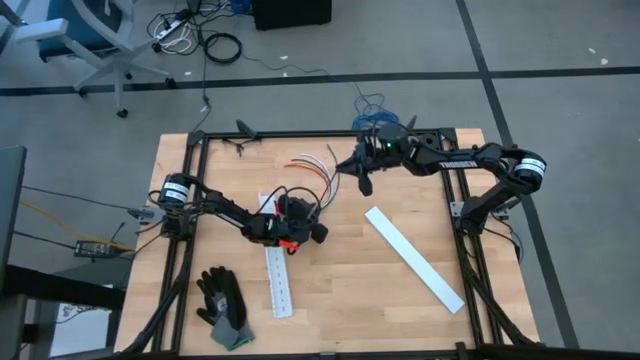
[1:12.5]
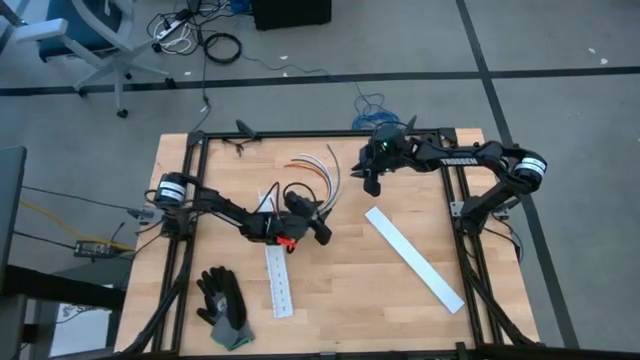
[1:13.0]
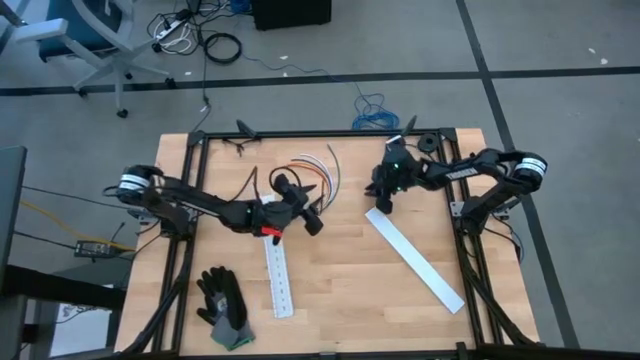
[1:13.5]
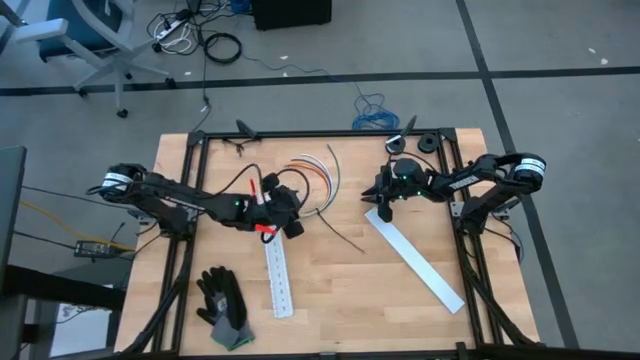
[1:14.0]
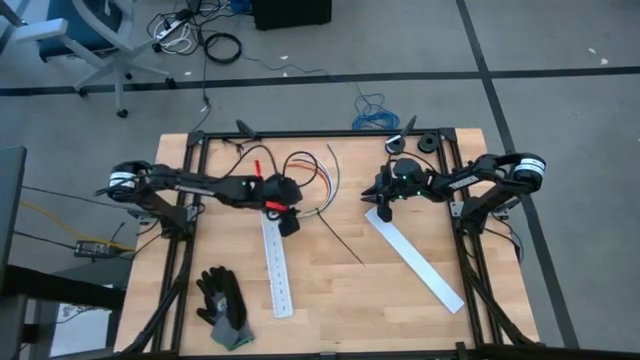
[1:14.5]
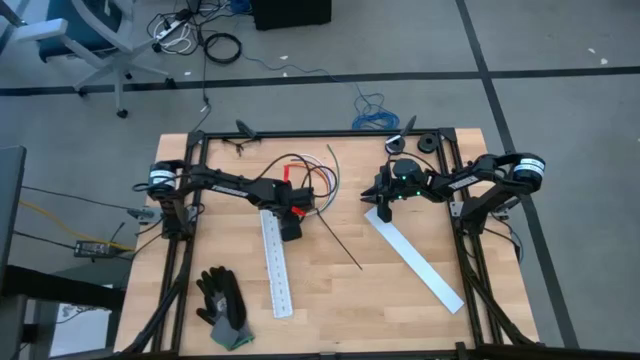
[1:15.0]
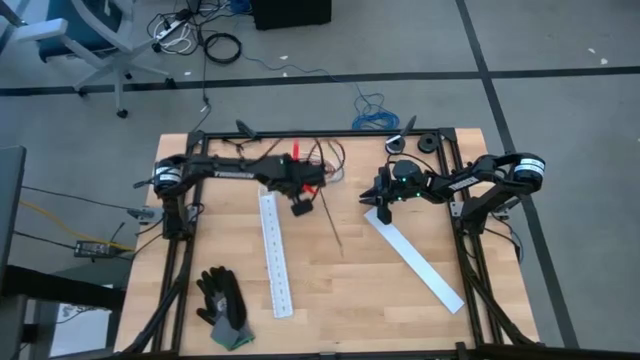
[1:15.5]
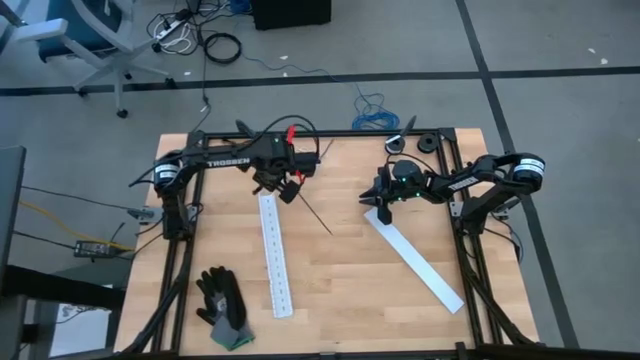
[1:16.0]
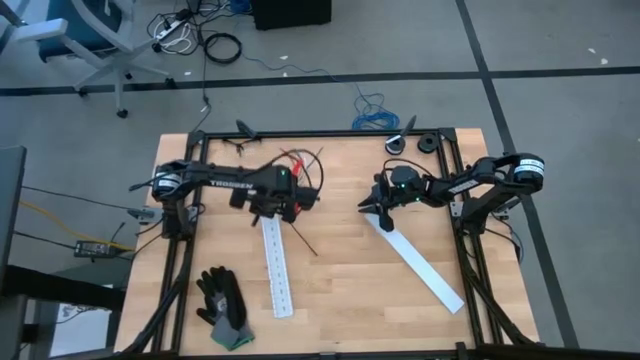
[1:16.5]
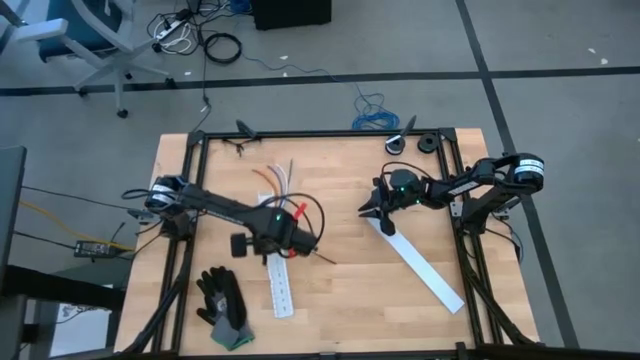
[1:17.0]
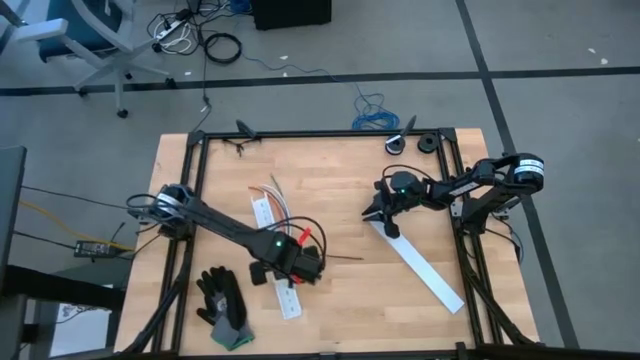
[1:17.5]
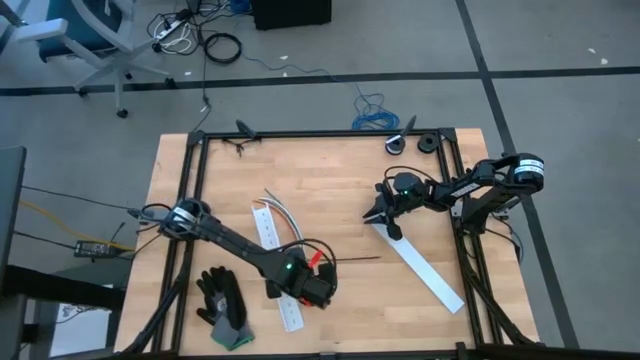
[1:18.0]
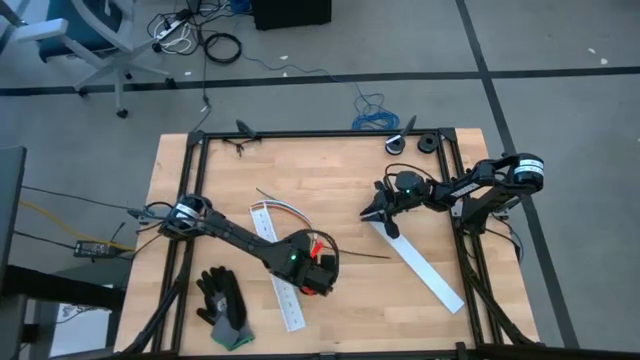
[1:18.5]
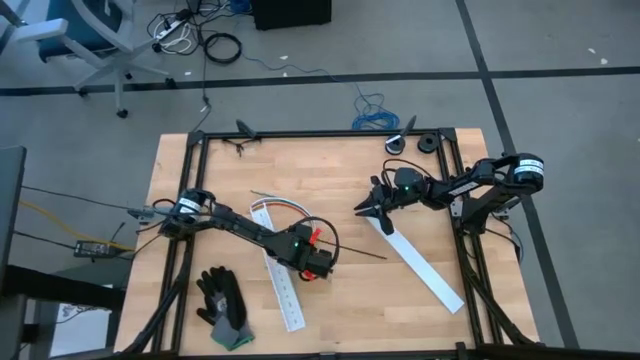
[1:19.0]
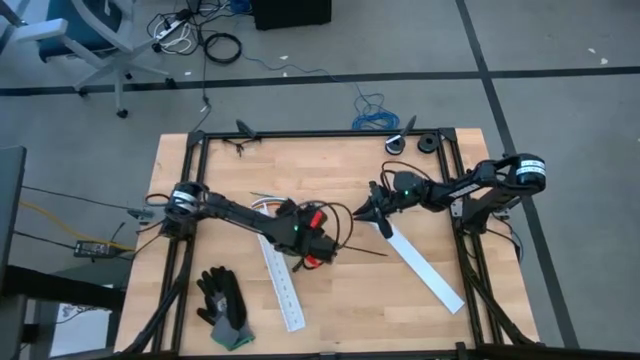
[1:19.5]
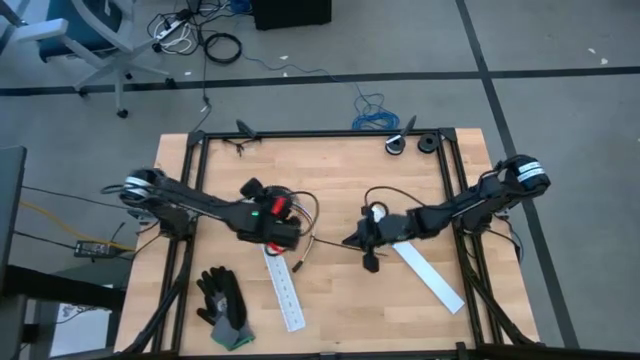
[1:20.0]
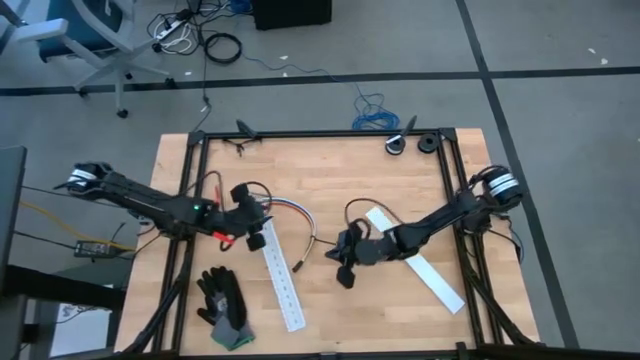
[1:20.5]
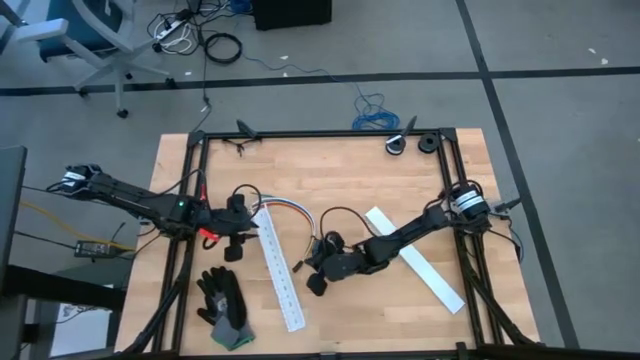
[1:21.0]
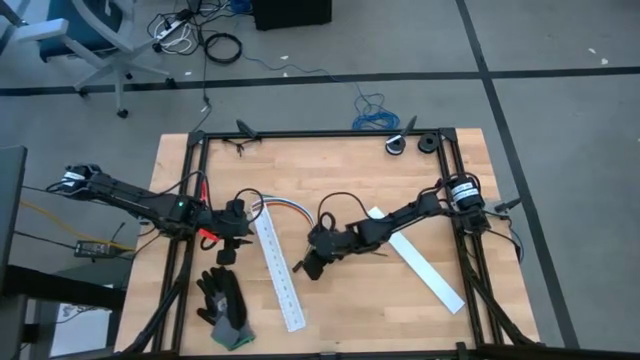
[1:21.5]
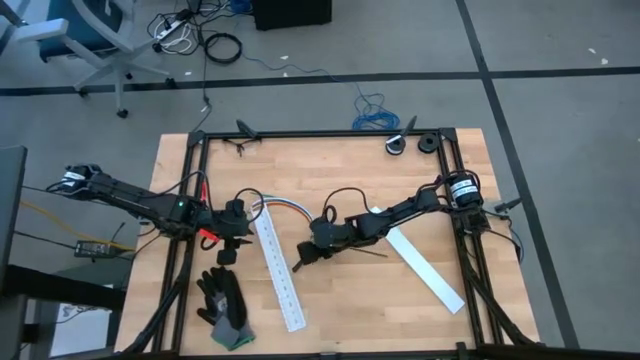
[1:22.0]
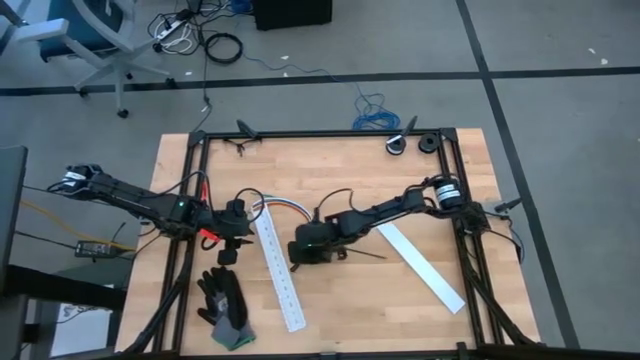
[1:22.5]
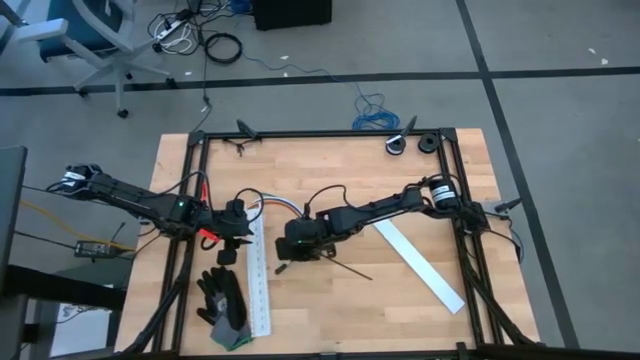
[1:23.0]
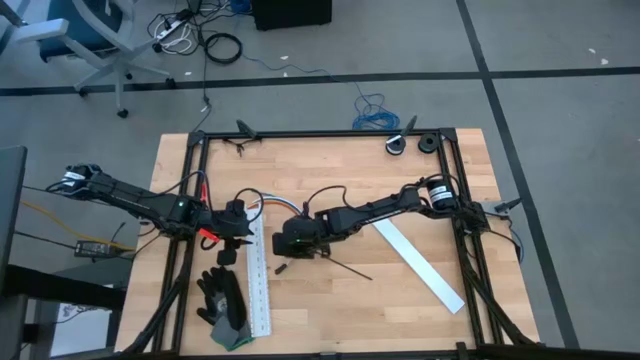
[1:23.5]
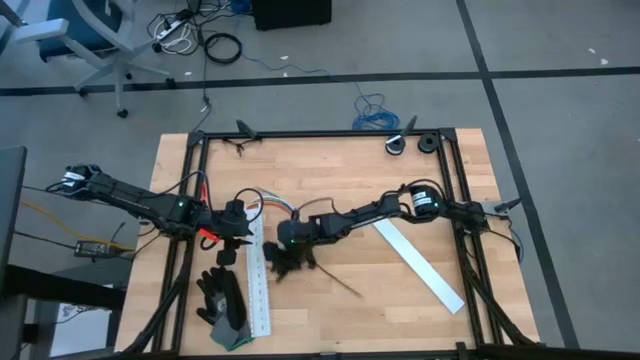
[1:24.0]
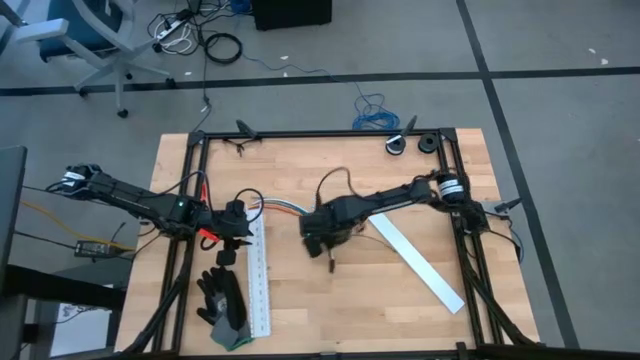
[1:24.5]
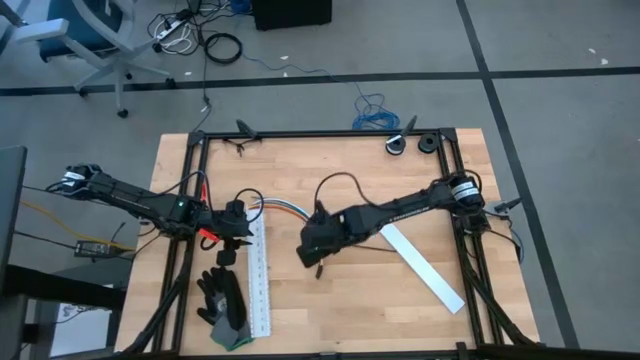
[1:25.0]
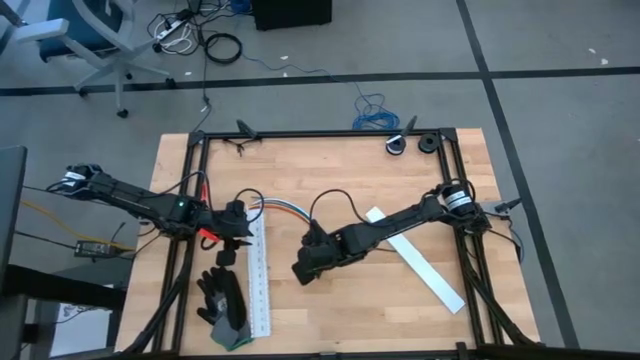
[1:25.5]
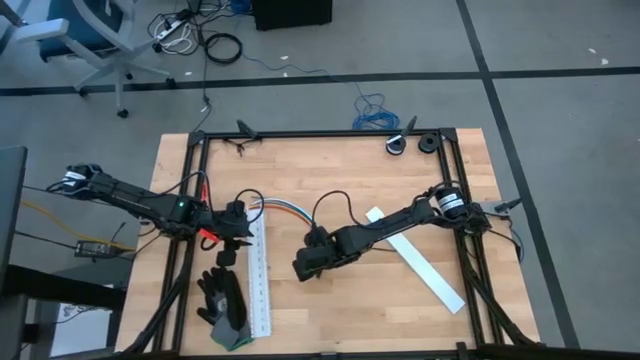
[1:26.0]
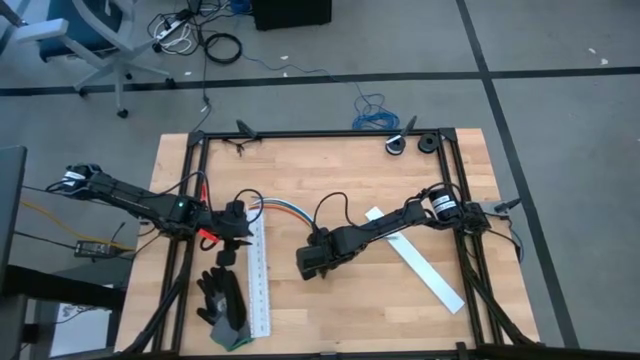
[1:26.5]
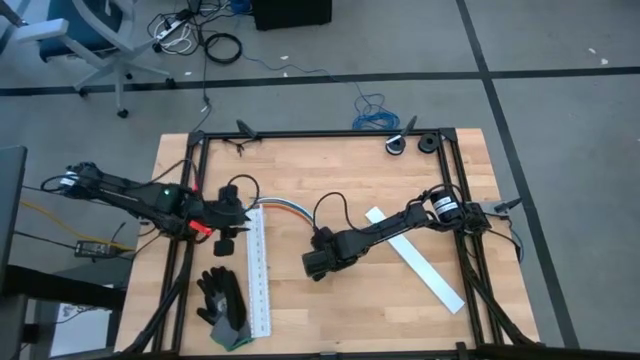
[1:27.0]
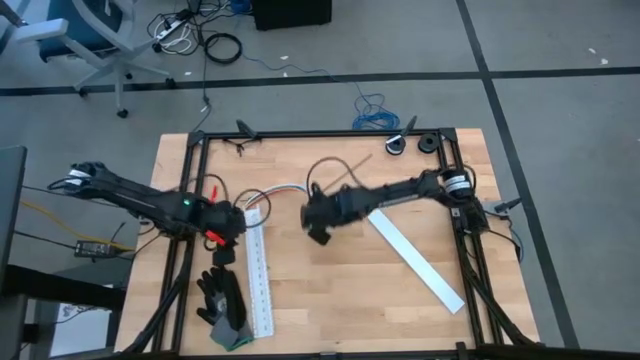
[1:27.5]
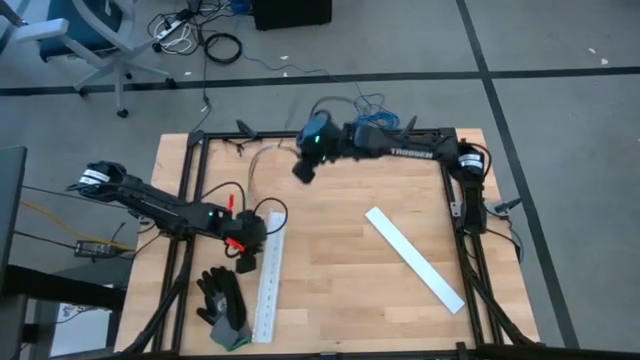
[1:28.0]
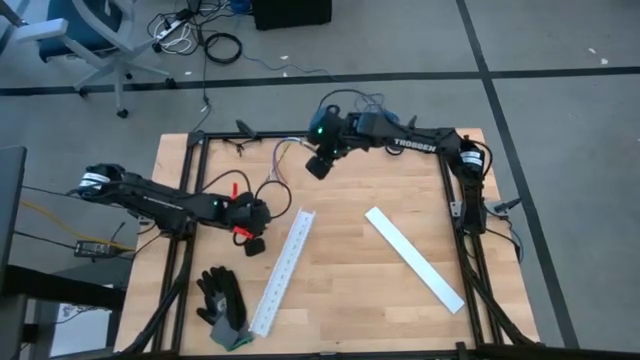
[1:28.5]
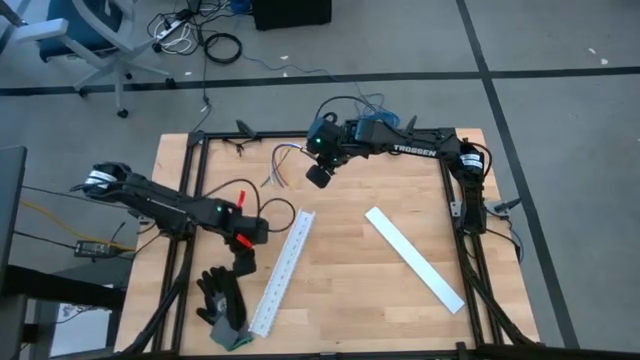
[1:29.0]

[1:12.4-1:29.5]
Task: Ziptie cables
Put the ziptied cable wires into the white cable duct

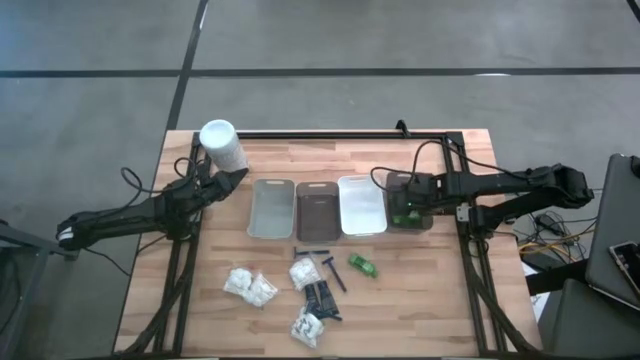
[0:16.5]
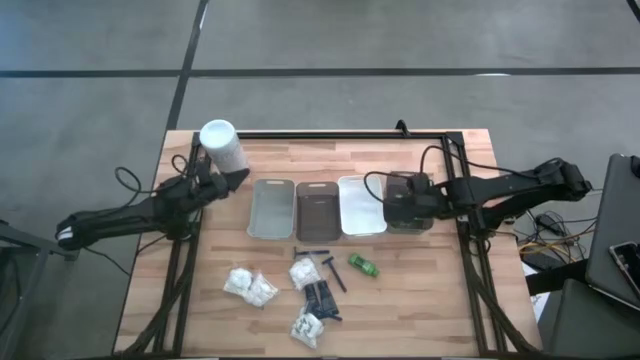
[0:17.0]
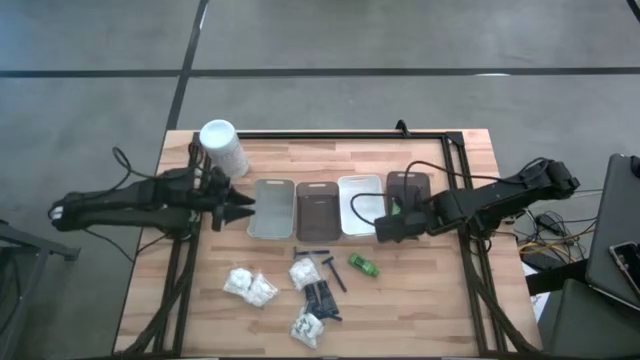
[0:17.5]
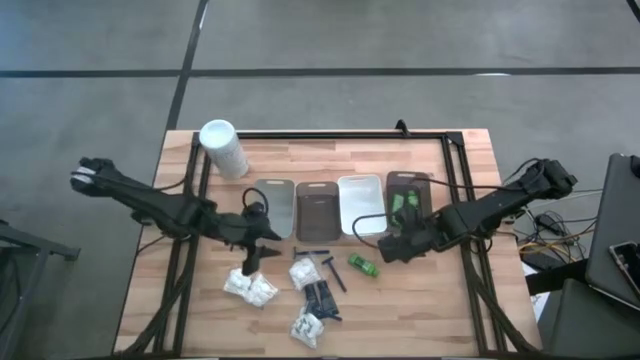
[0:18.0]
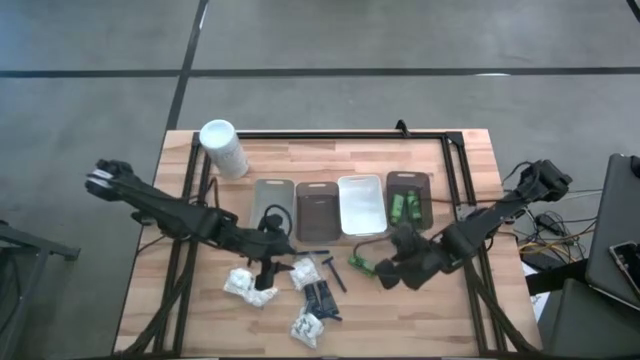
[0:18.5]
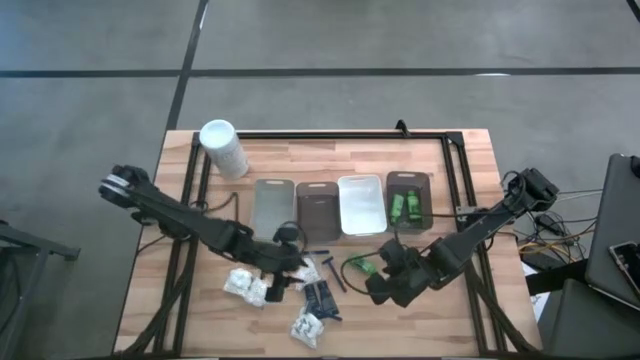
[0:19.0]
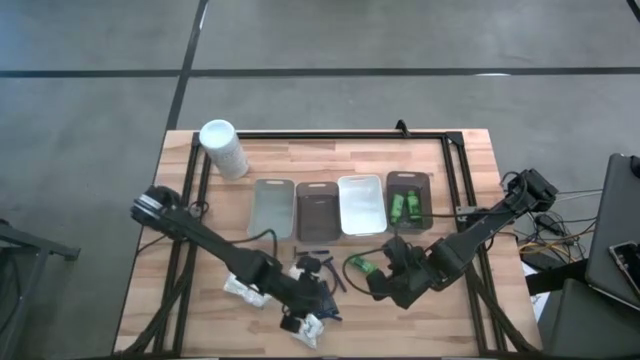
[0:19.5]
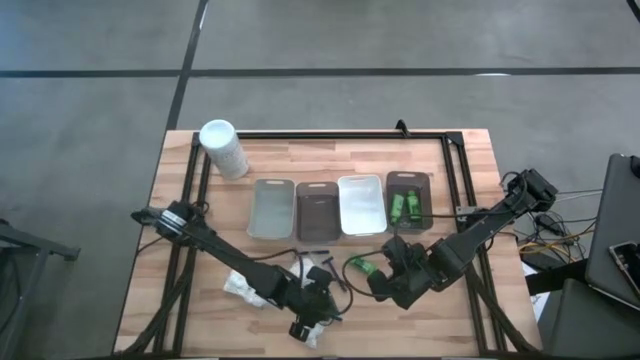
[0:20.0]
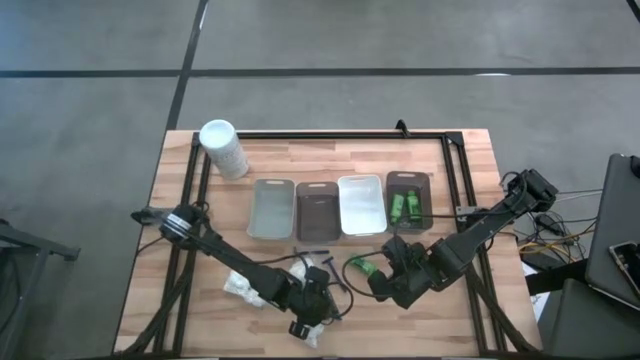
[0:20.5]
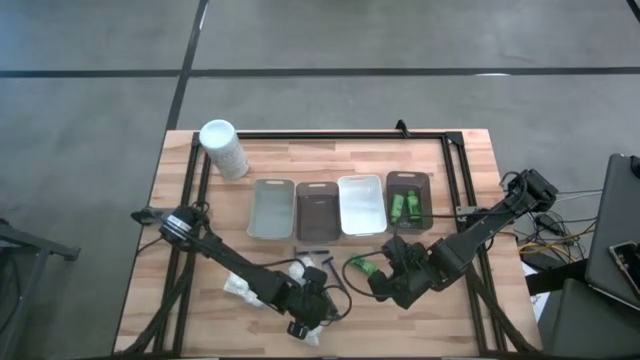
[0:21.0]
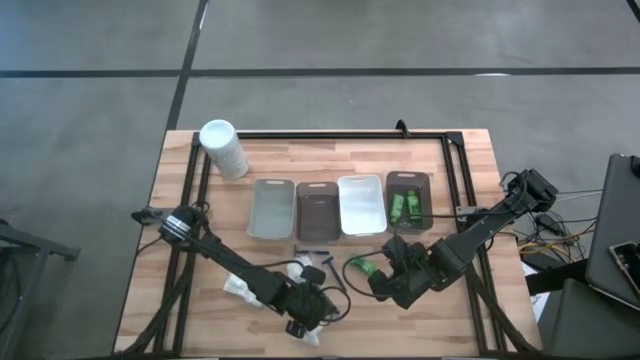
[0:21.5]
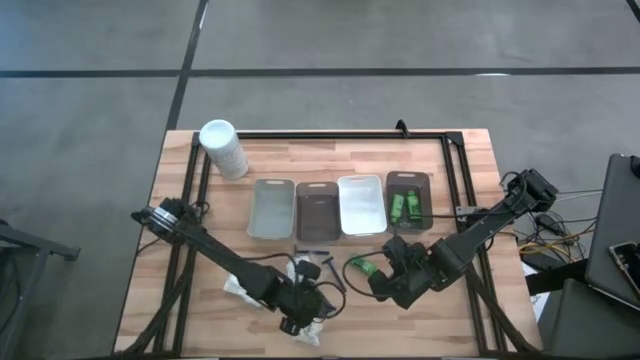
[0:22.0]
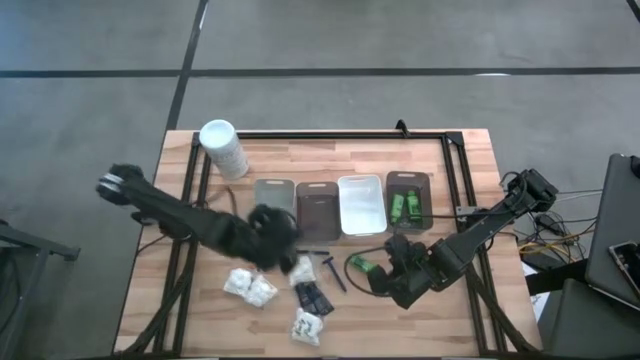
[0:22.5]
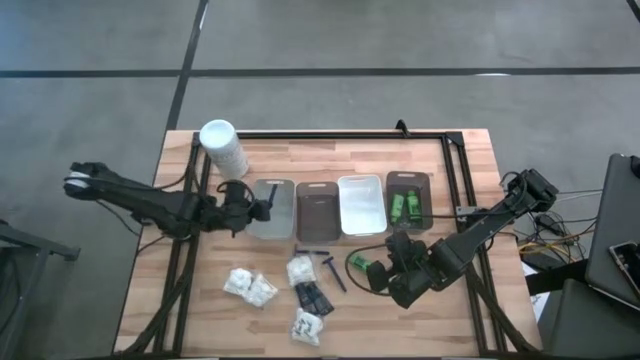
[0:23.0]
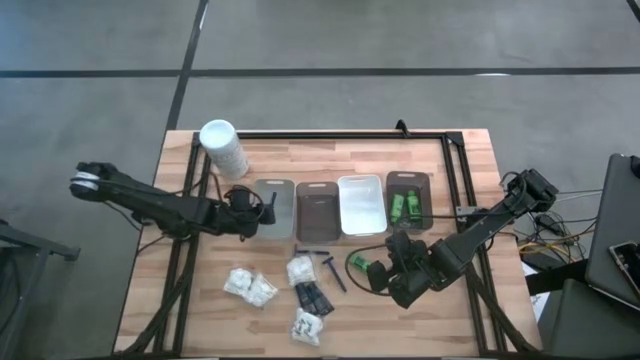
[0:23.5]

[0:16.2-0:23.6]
Task: Pick & Place Travel size toiletries
Put the blue razor into the gray bin
